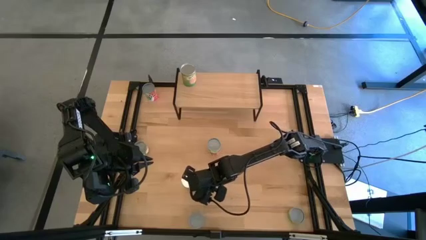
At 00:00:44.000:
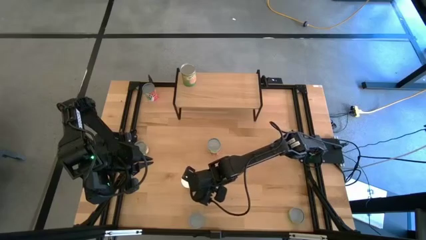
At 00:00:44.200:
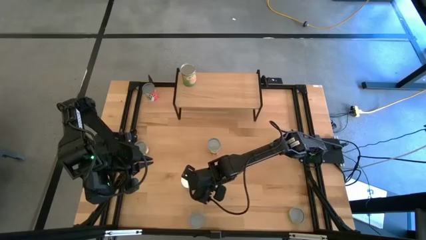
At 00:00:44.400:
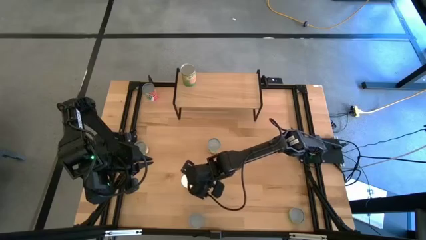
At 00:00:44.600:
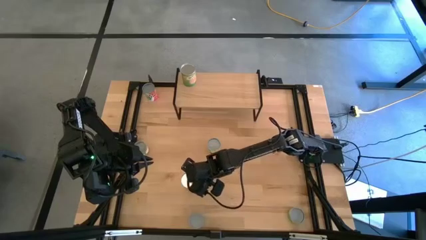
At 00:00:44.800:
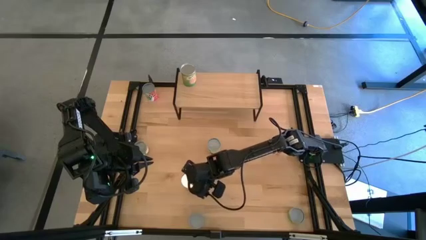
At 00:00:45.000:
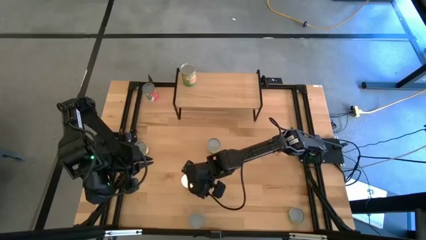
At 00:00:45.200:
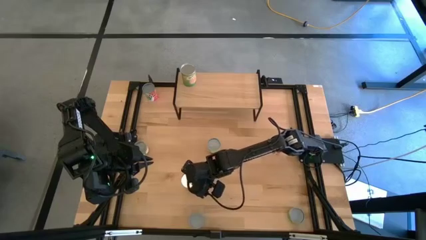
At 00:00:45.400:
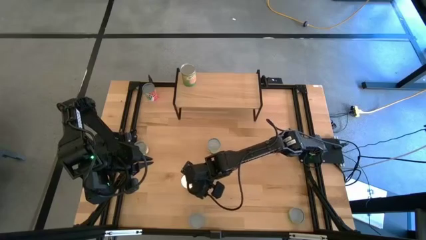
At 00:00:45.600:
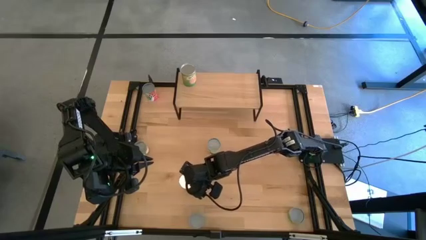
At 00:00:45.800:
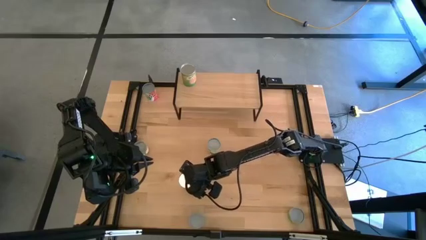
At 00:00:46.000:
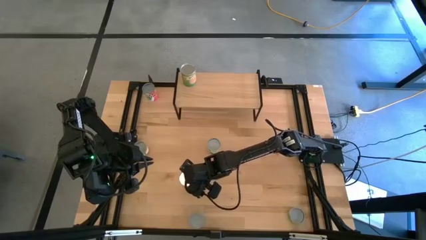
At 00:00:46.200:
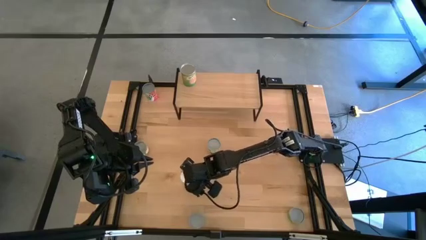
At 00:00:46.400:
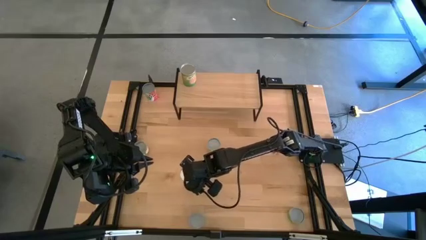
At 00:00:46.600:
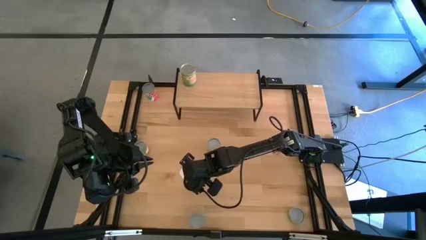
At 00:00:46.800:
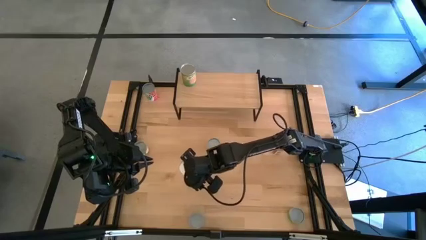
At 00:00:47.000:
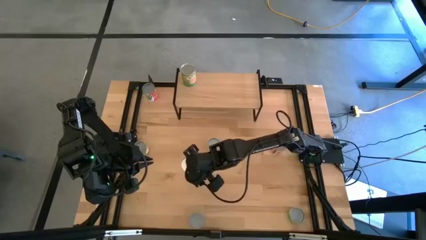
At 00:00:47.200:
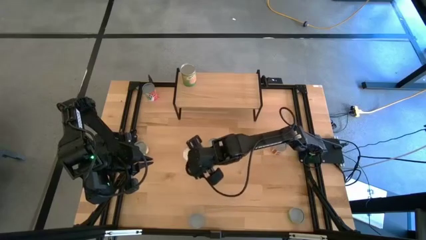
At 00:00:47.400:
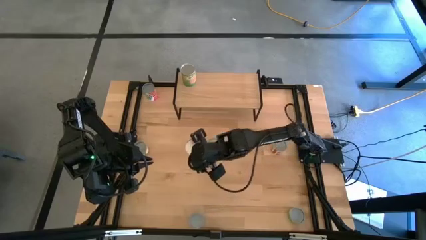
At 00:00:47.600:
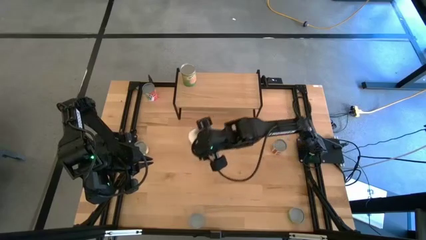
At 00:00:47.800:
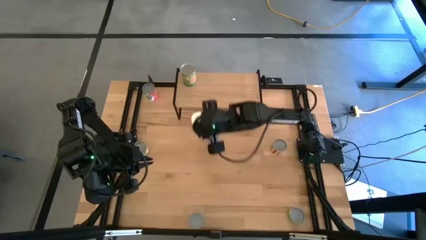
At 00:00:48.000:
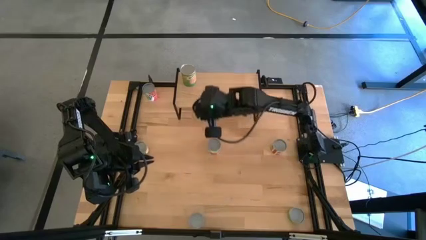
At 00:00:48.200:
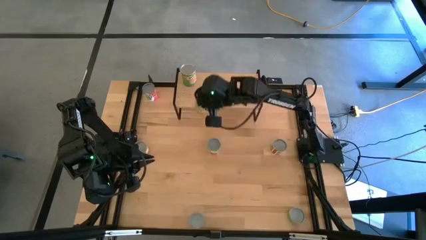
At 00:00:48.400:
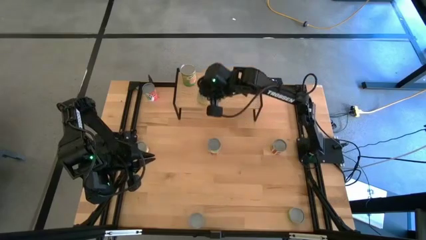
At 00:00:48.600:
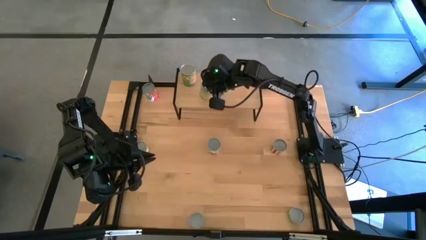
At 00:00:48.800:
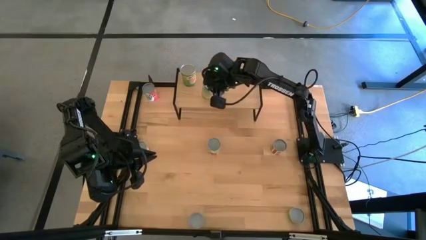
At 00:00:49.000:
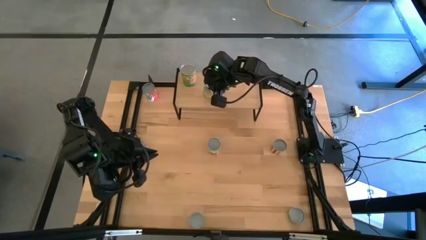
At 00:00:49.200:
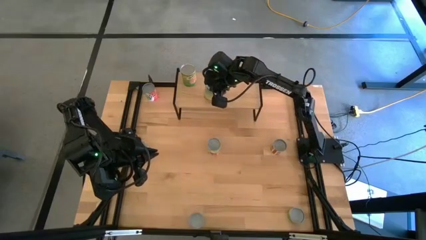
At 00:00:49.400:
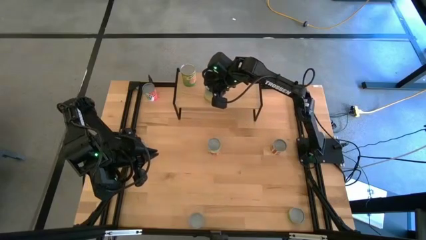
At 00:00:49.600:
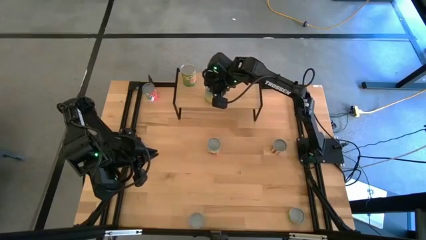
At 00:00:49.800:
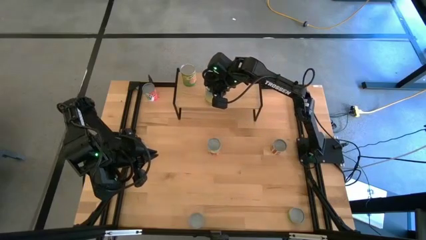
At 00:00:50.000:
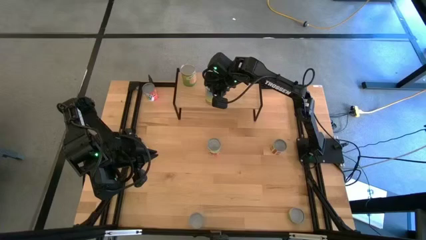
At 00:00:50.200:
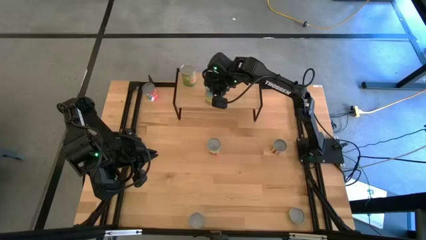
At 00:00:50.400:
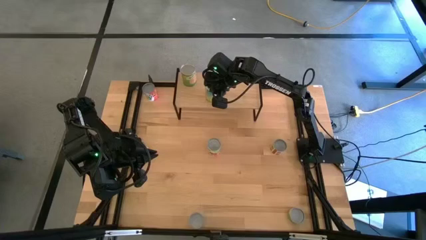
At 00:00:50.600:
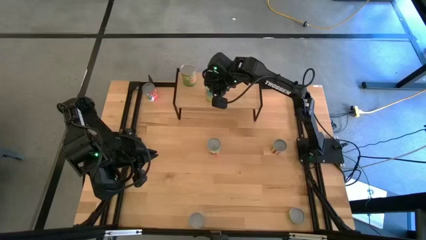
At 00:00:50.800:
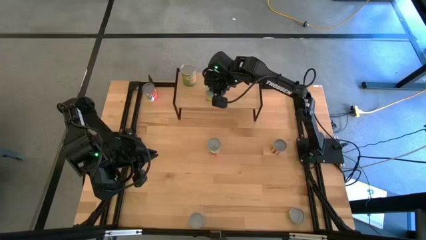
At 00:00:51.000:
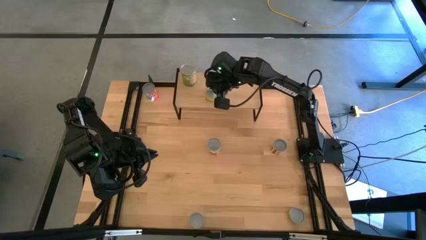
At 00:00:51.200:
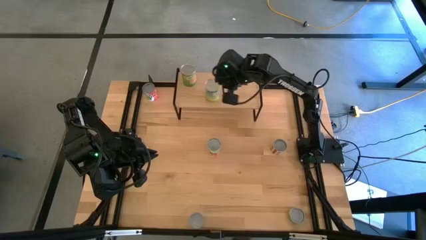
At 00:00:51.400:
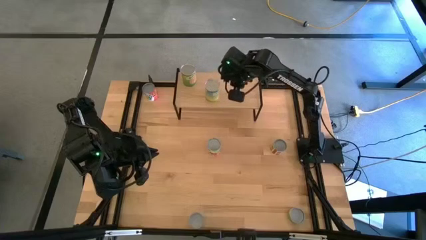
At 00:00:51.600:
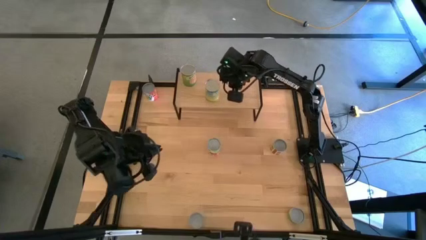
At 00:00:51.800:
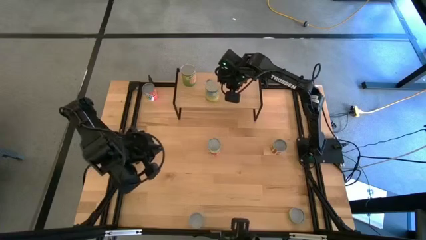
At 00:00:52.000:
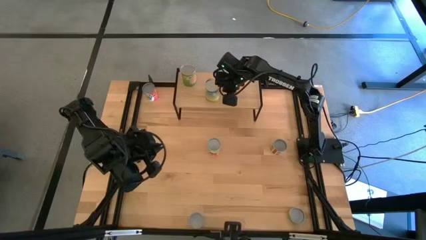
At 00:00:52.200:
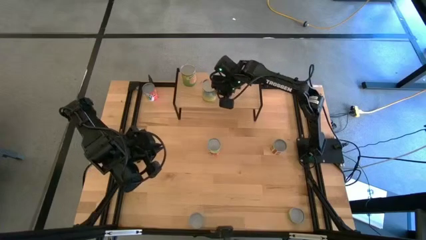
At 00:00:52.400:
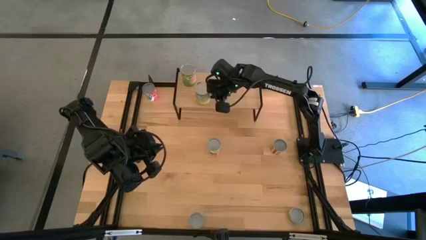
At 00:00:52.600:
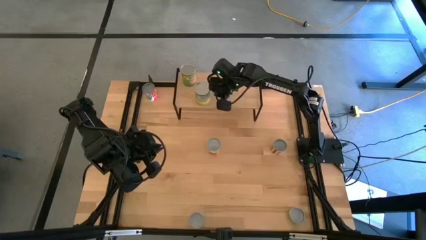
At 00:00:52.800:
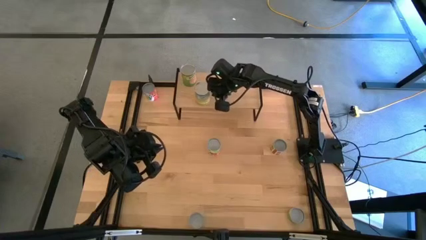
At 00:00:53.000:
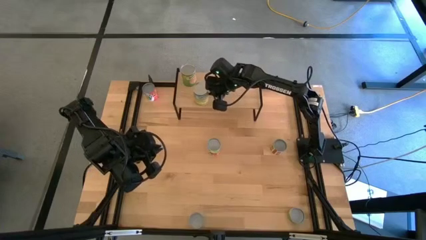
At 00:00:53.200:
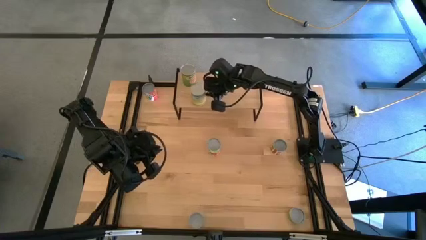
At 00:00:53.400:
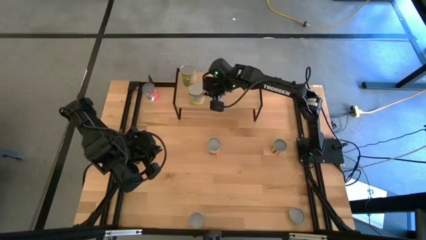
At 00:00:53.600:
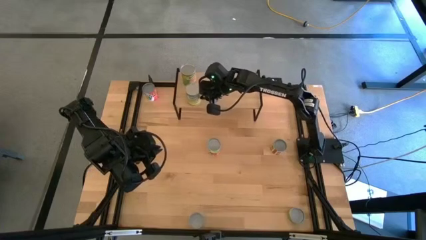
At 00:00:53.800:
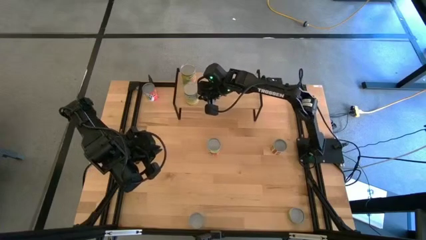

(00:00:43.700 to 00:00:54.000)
Task: Pick and place cans onto a shelf
Put the canned carrots on the shelf
